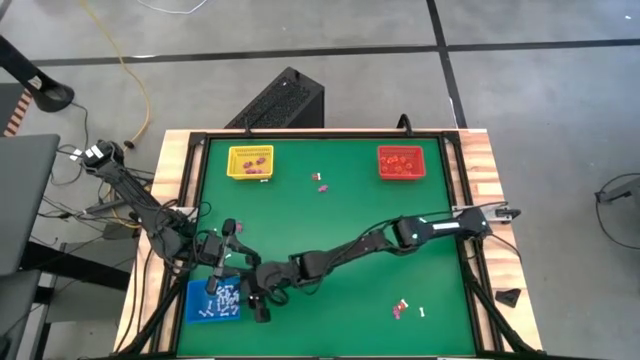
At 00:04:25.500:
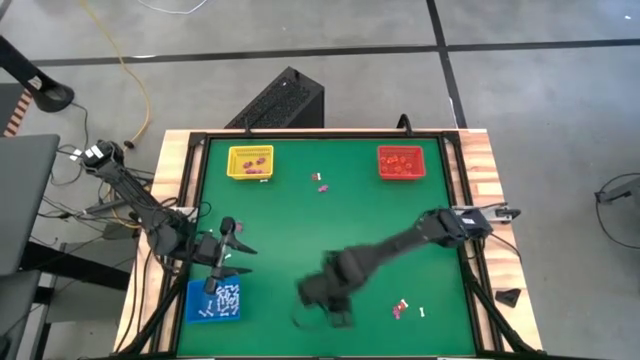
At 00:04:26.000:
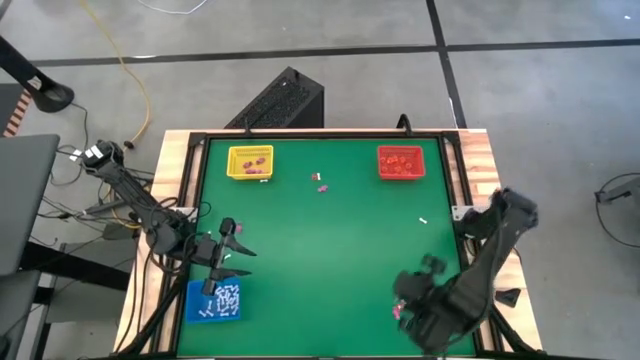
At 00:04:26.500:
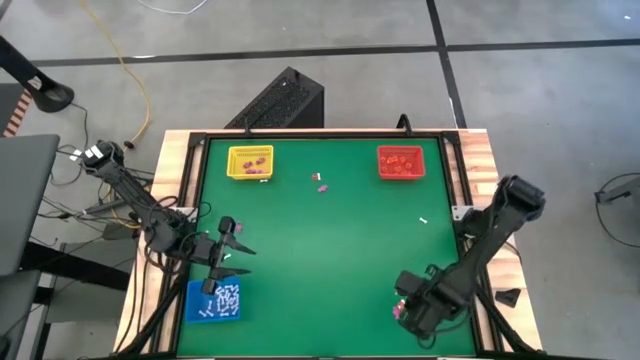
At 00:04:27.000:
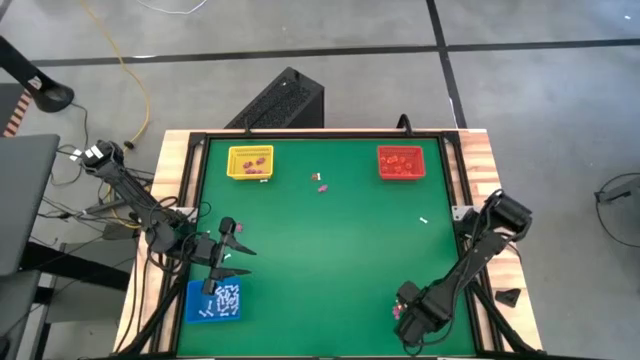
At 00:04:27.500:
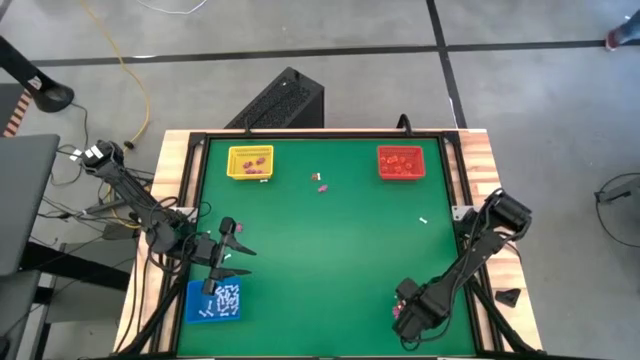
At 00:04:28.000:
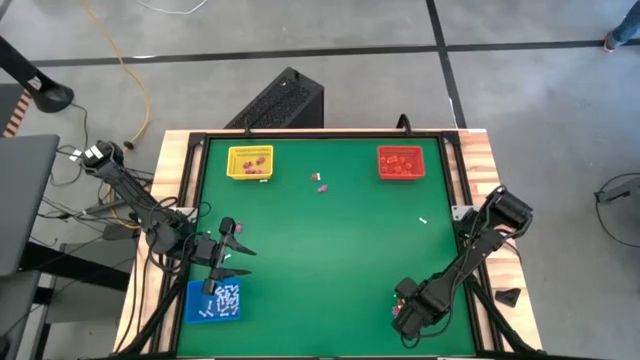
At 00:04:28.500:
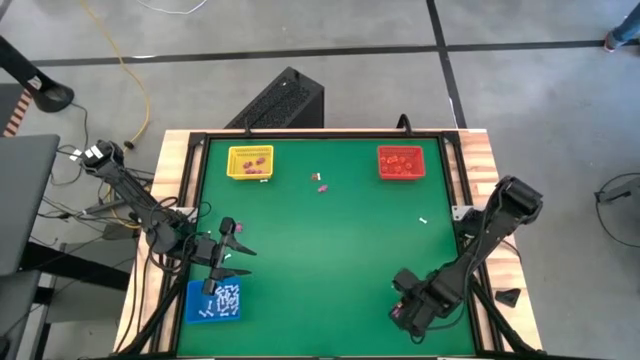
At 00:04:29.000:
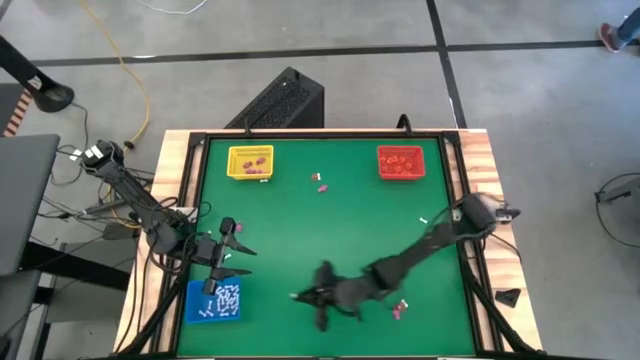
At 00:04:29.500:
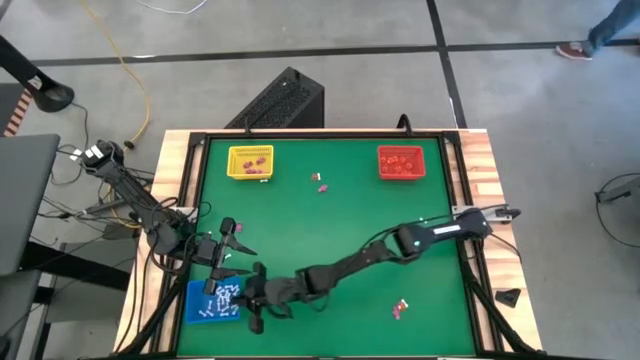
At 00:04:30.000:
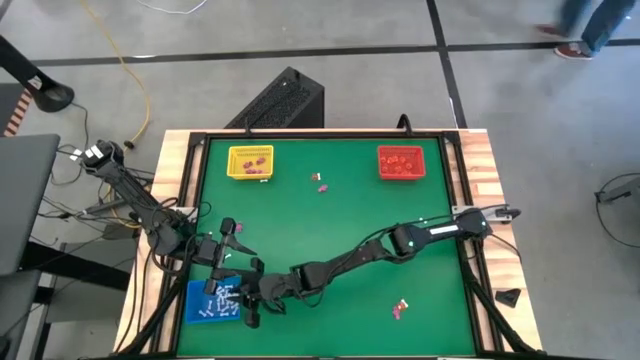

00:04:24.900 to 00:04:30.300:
Task: Sort Halloween decoration
Put the white bone toy into the blue bin

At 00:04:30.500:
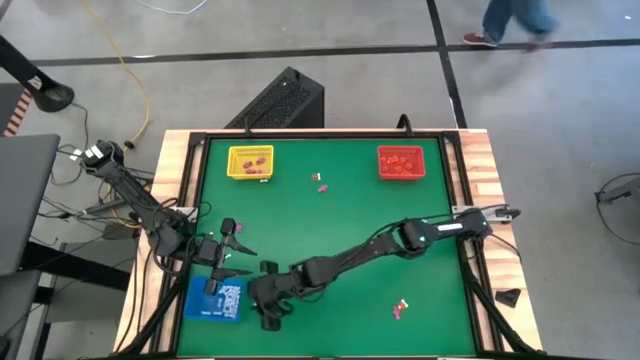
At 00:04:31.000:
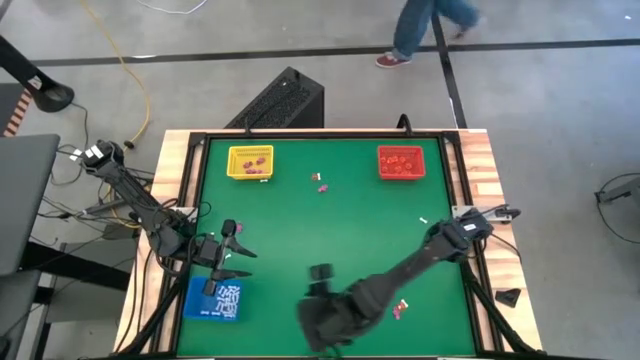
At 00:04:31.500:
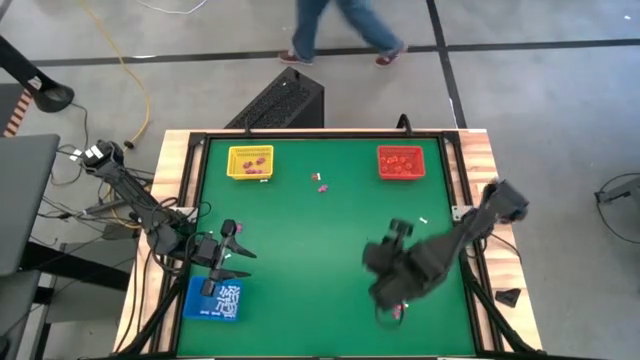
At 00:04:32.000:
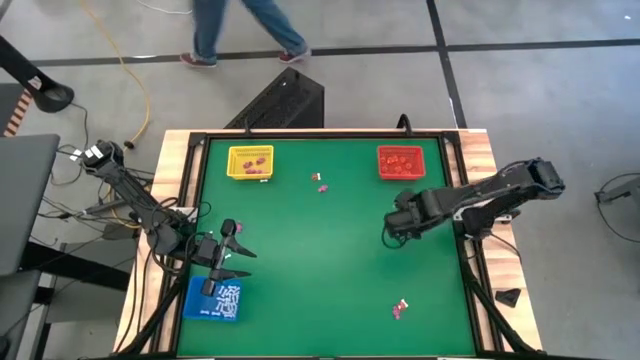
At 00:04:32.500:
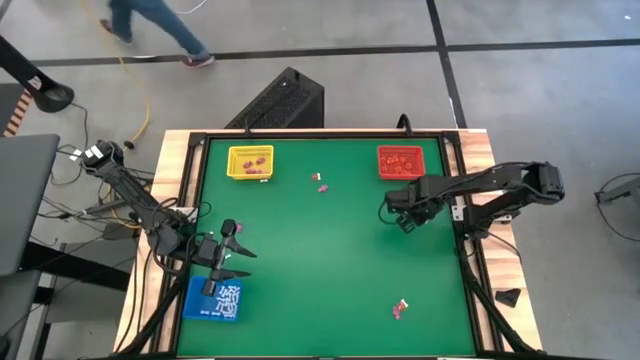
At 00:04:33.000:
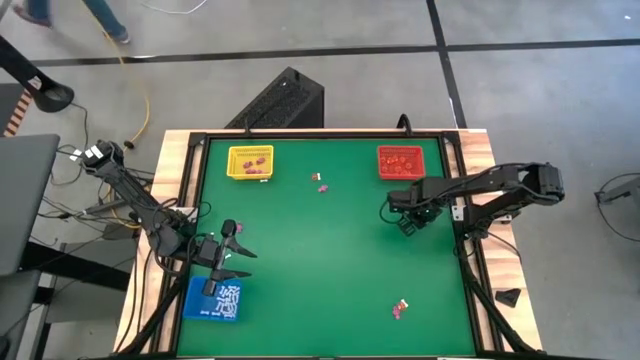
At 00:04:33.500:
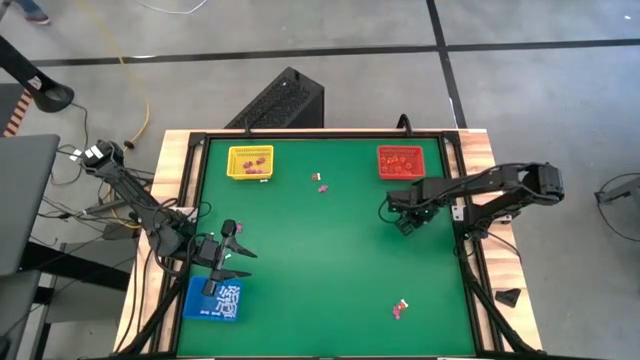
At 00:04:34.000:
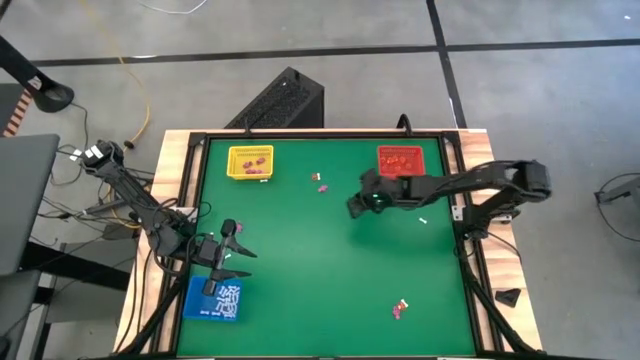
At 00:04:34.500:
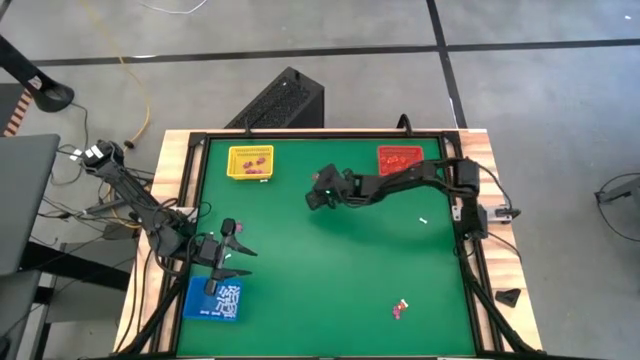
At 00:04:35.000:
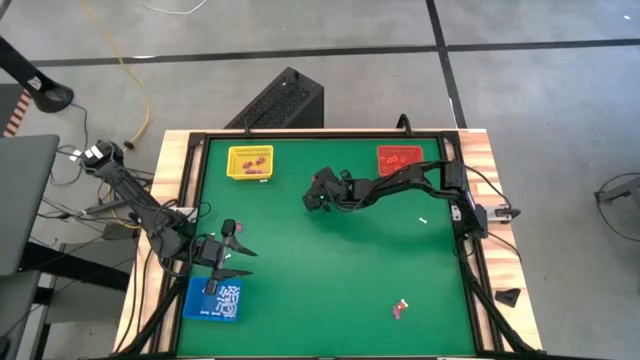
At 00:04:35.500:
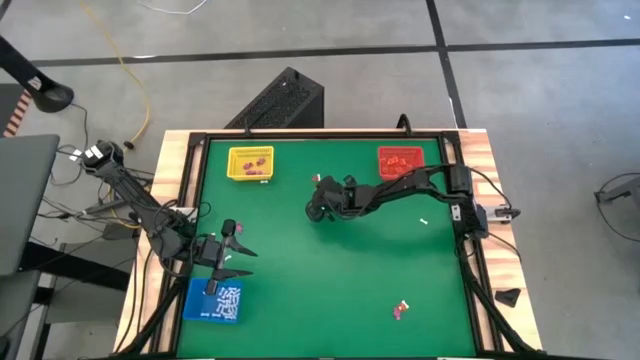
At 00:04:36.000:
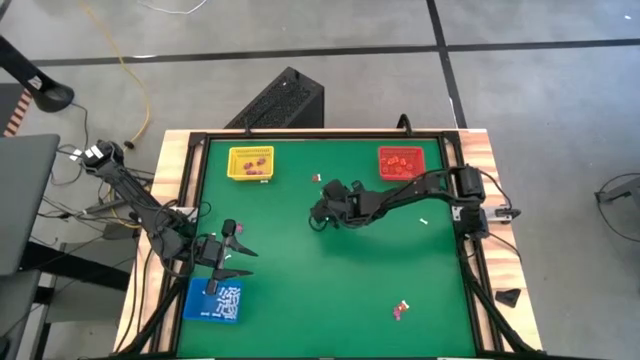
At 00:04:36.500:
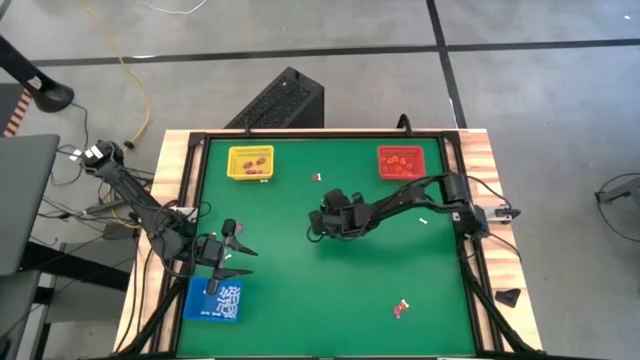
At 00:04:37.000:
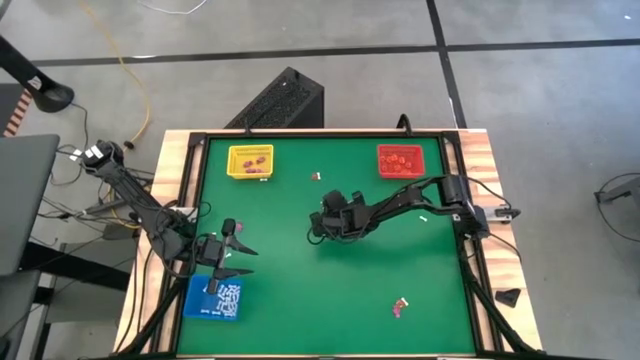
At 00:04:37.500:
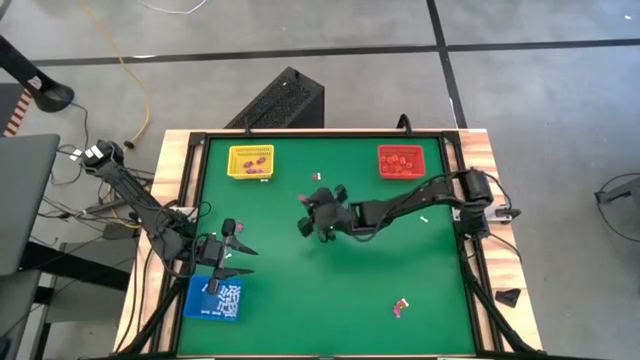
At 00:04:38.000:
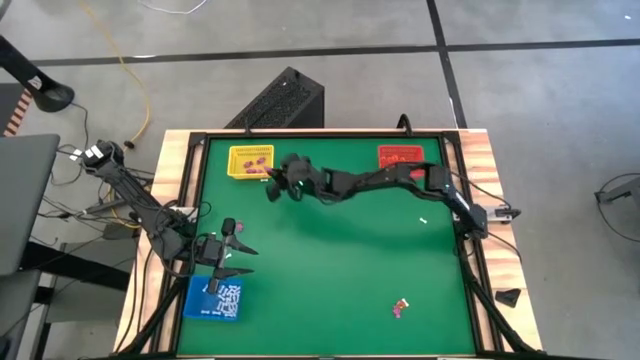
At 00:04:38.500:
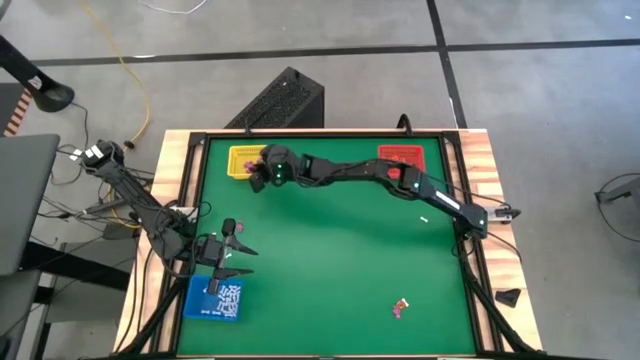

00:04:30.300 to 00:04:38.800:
Put the pink skeleton toy into the yellow bin

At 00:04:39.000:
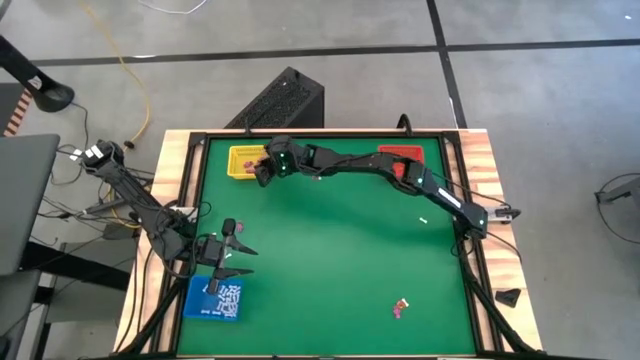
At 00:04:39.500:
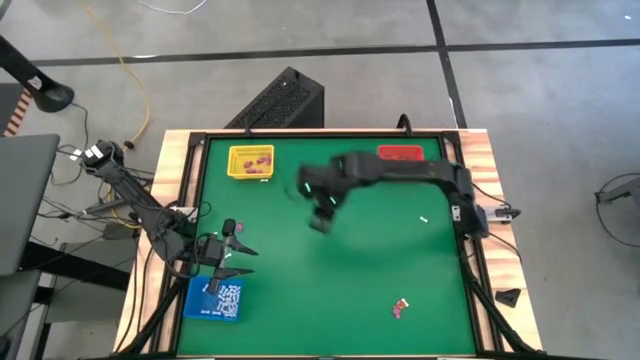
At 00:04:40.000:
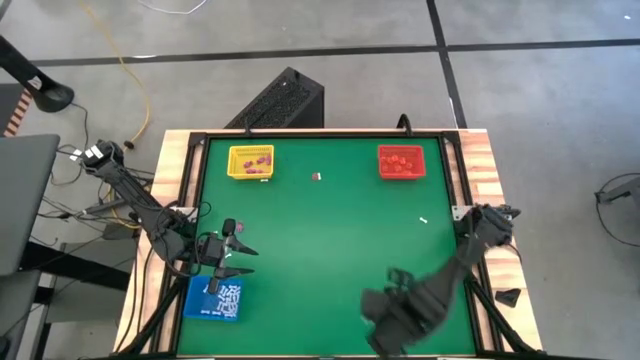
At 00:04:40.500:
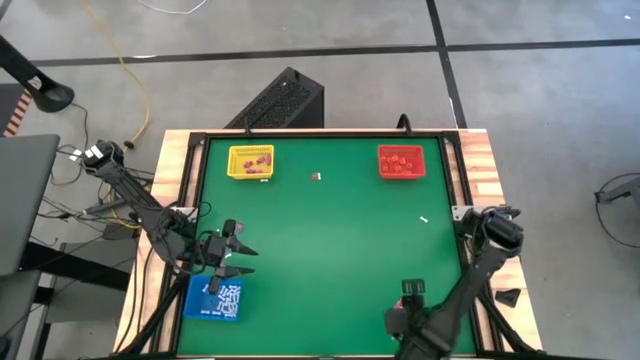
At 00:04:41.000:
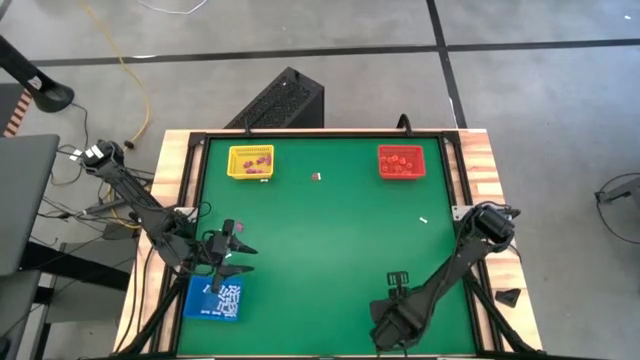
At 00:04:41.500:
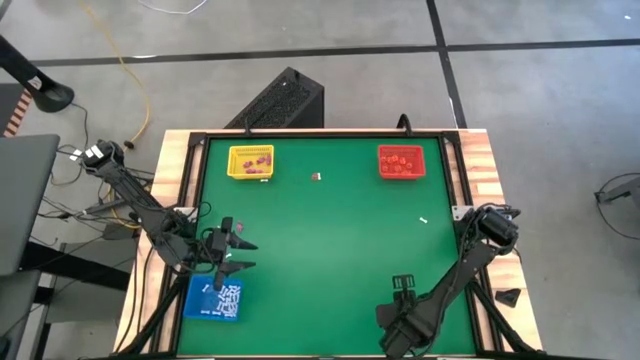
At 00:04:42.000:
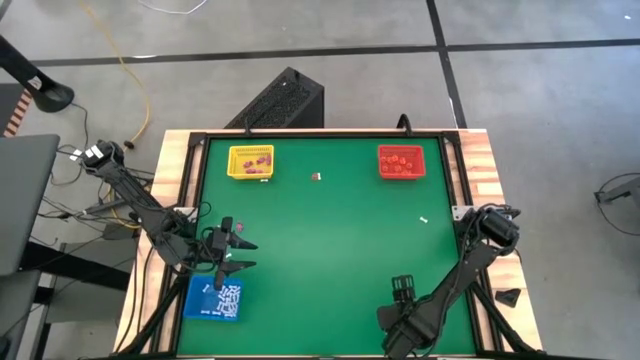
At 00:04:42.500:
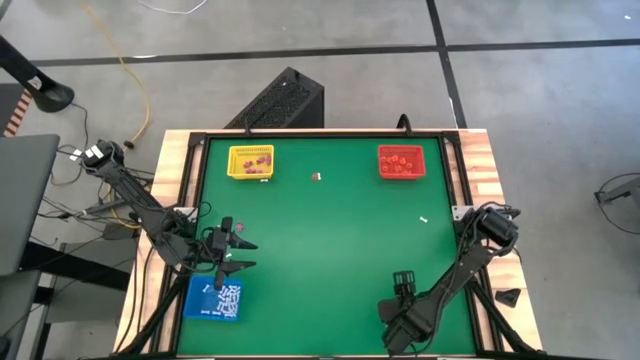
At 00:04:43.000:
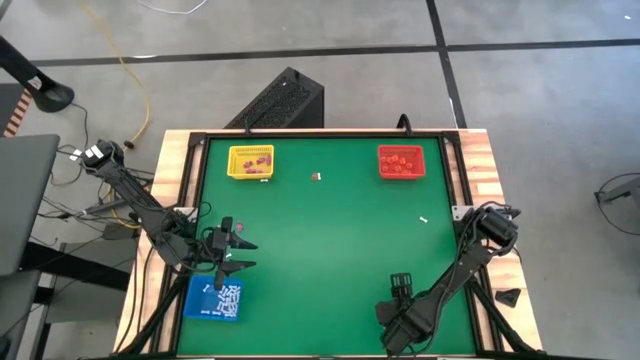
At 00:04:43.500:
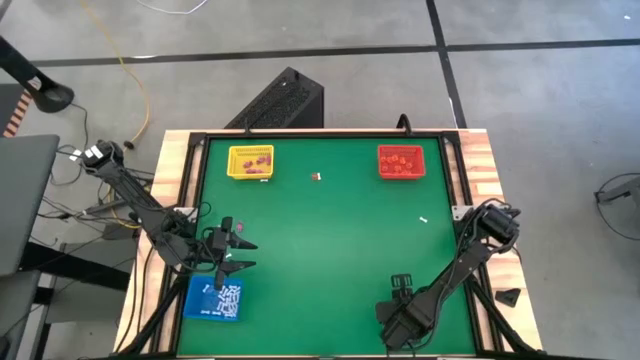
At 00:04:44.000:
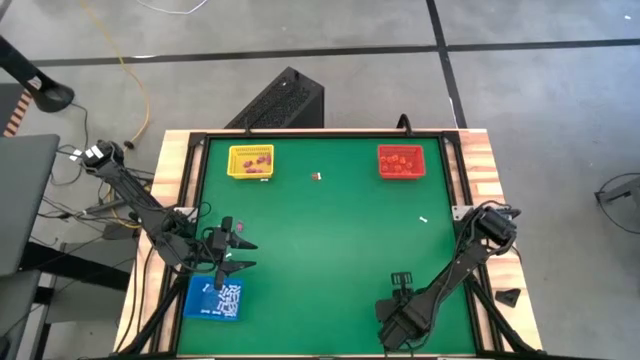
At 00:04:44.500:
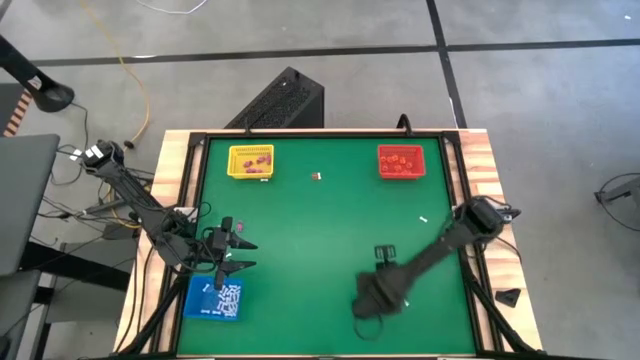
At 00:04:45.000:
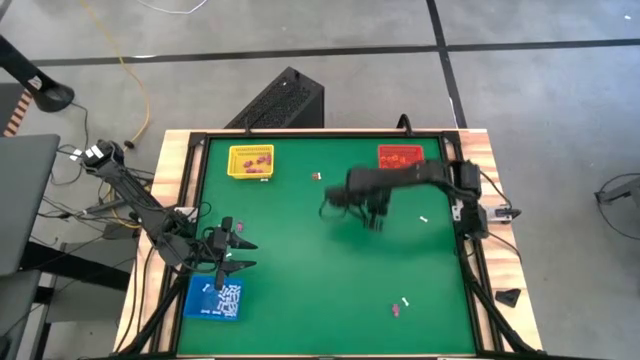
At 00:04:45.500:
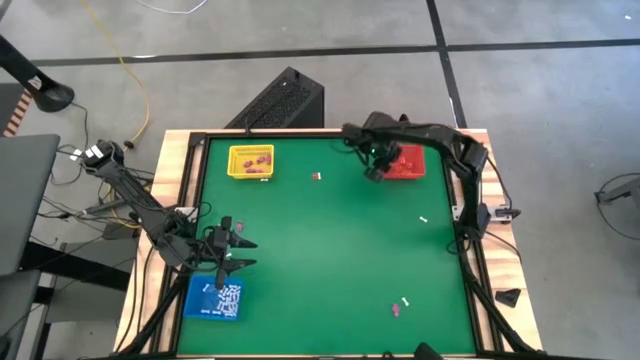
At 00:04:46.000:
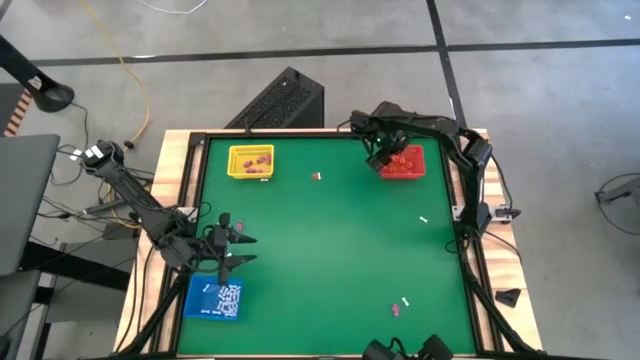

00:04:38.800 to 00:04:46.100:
Put the pumpkin toy into the orange bin
